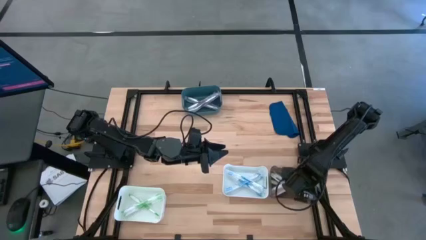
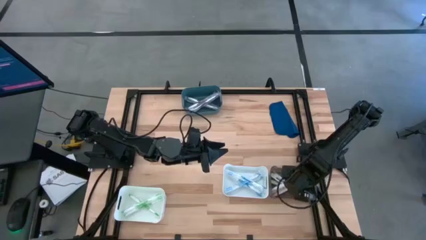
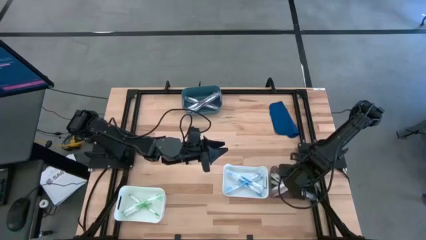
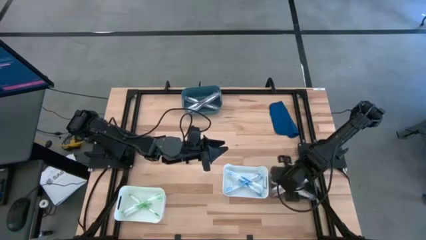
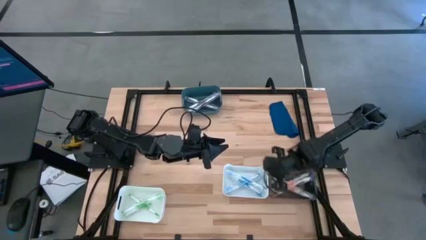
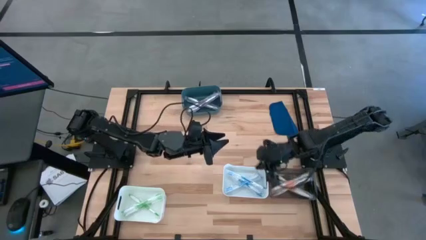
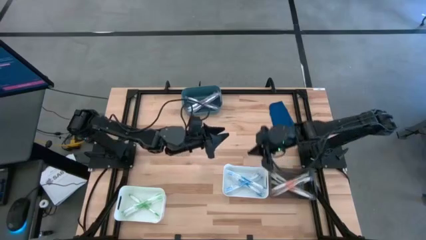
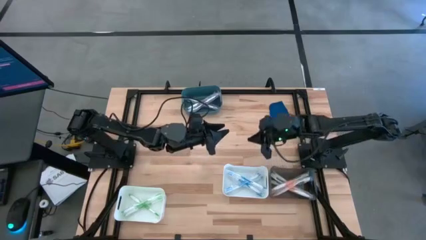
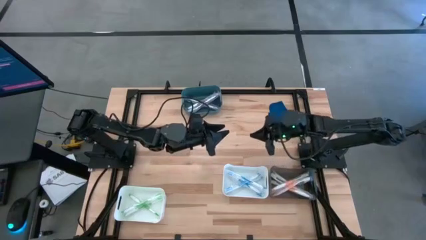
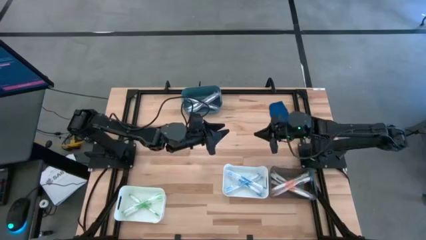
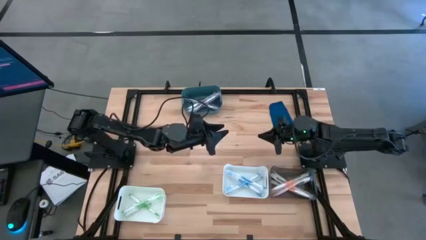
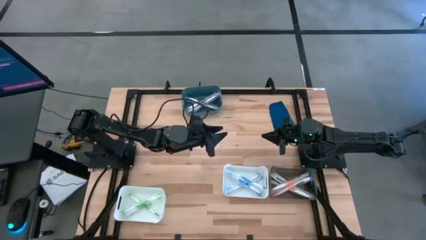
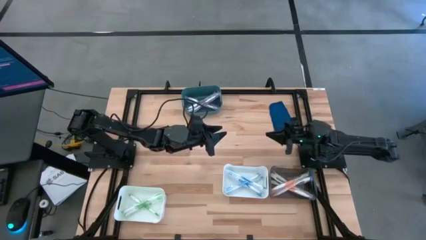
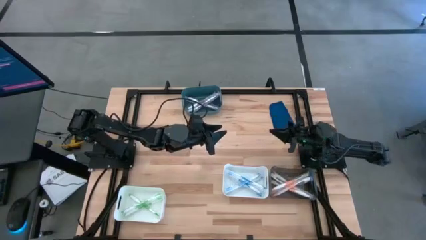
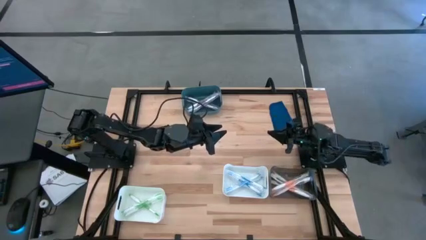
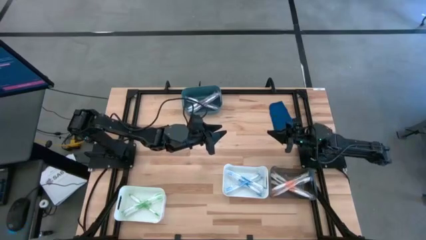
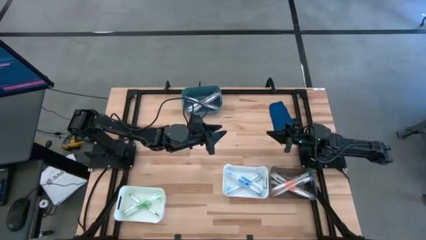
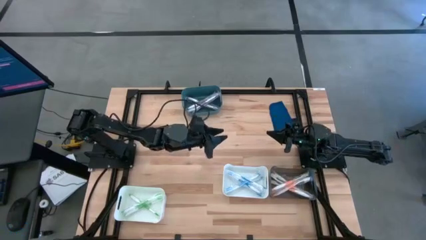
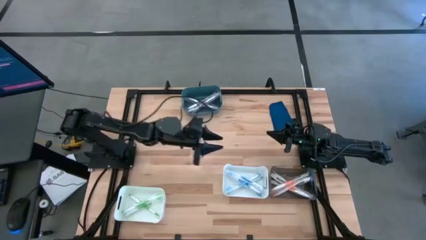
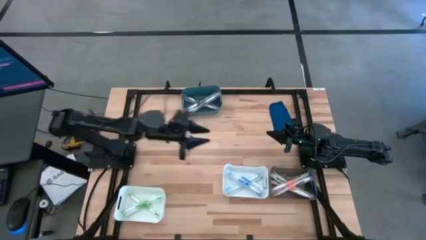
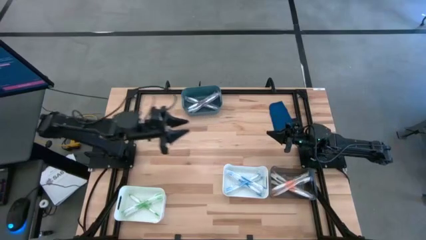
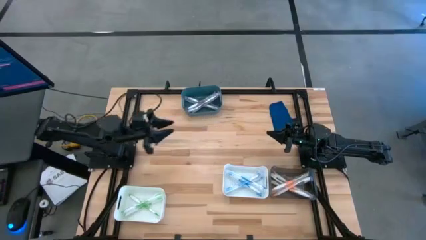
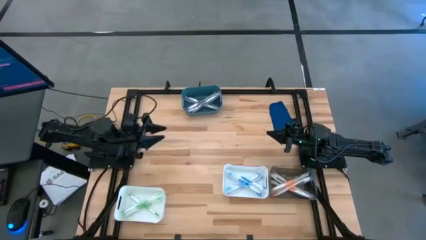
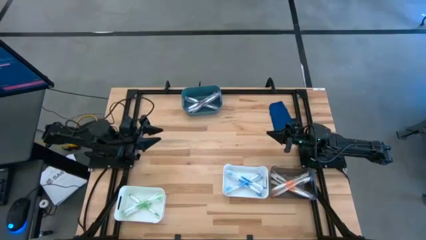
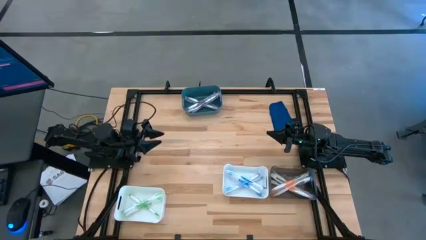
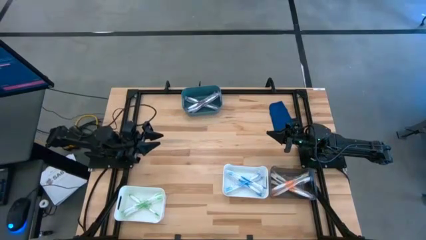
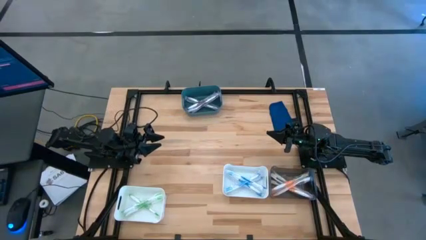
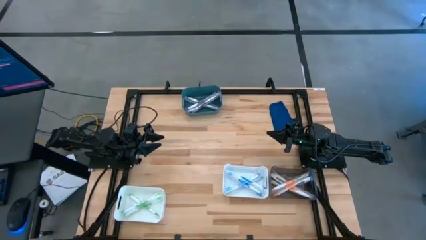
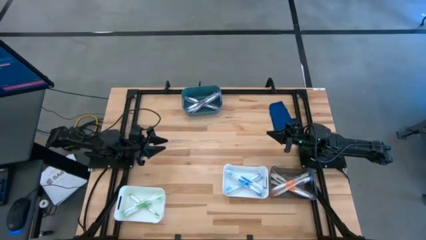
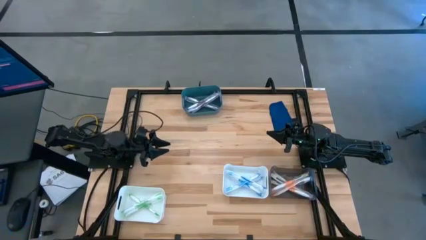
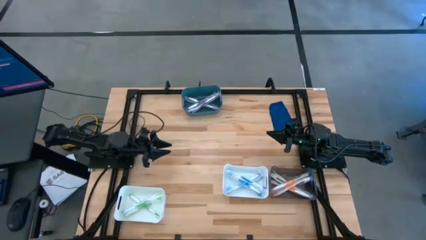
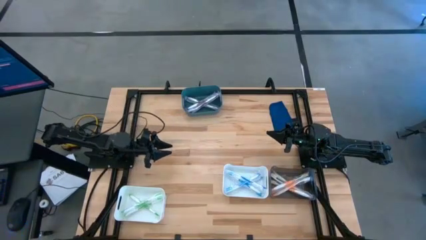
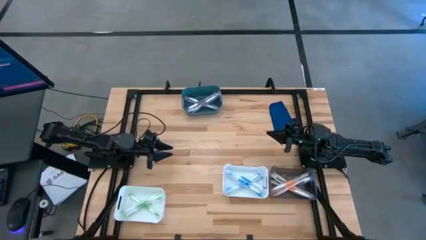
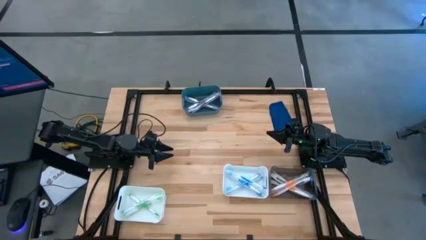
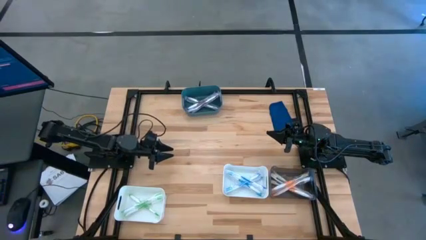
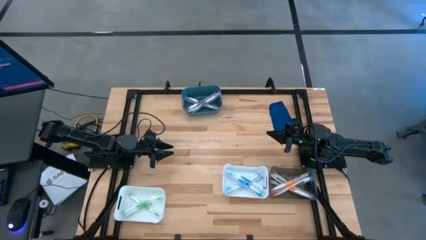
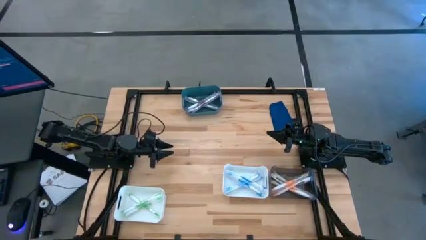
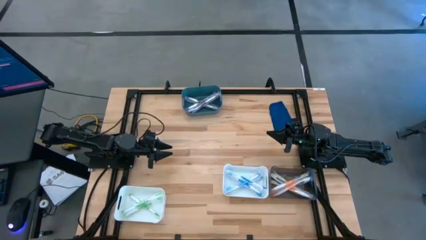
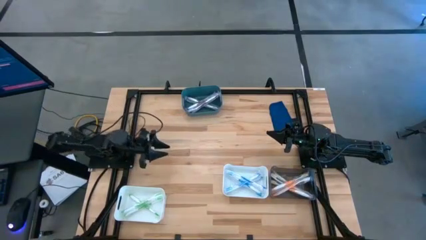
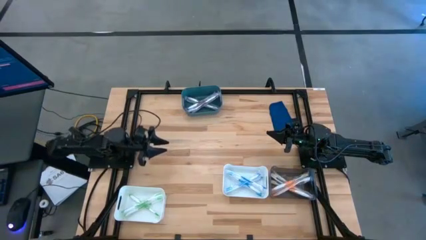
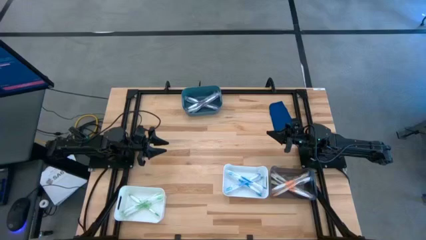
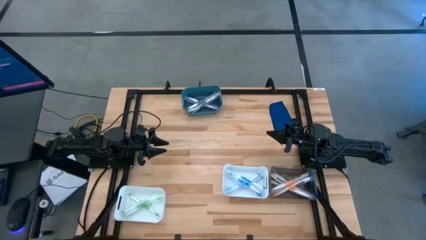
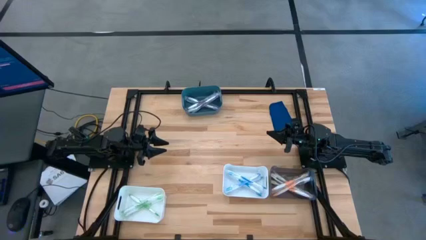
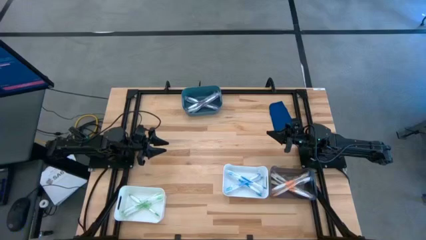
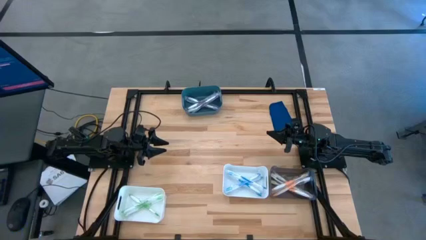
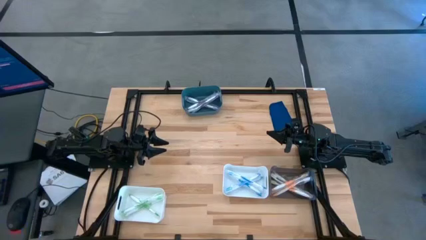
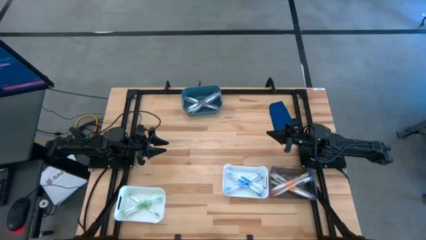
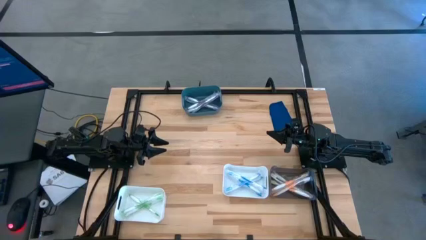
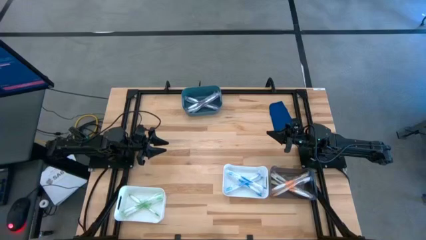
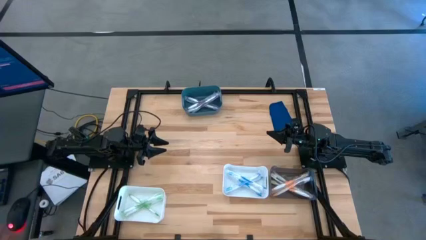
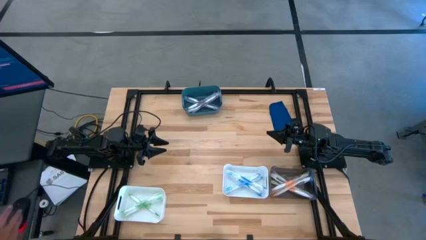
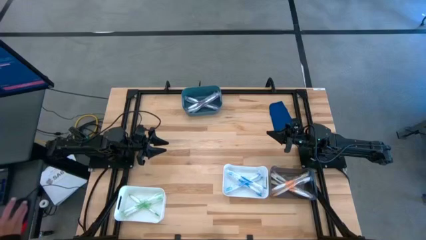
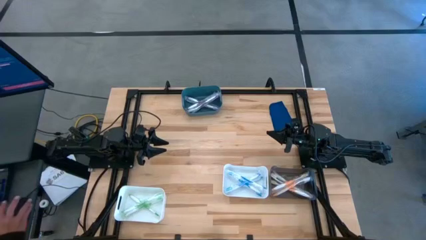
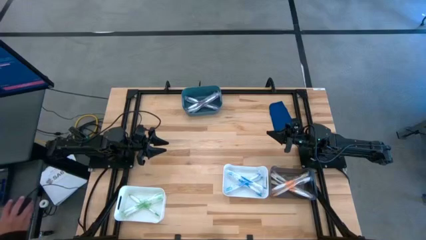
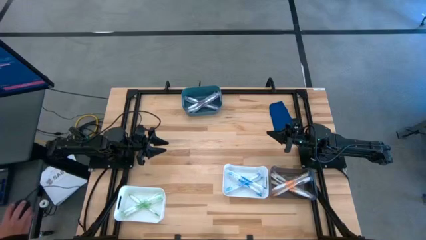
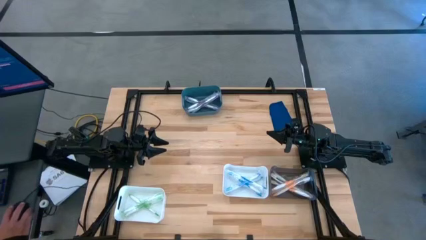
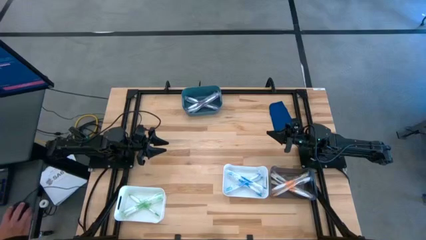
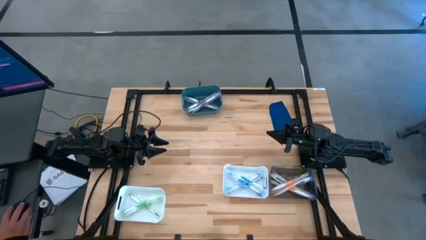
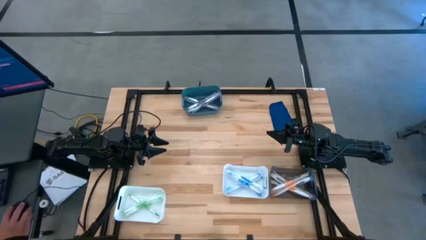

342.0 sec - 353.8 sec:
Task: Pick & Place Toothbrushes
Return to Home Position

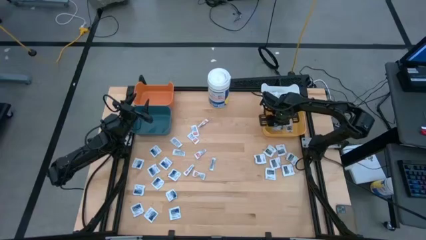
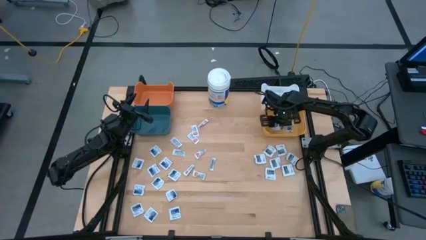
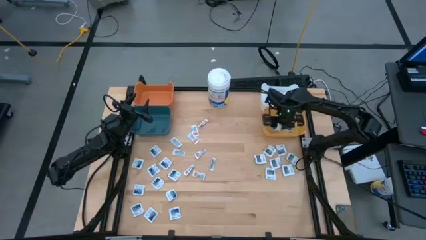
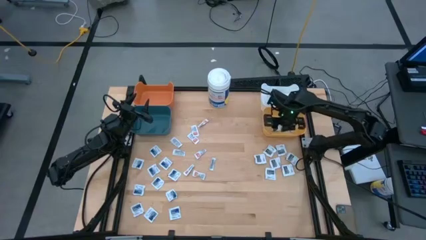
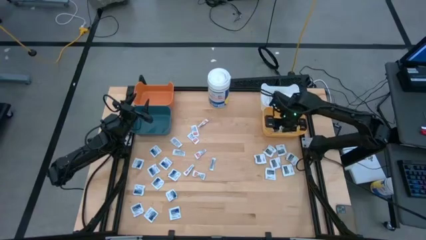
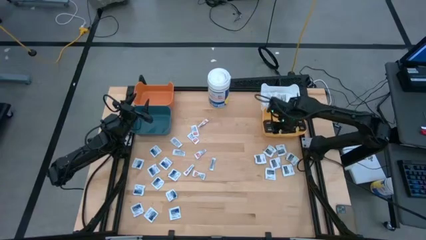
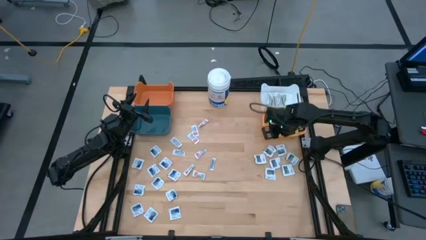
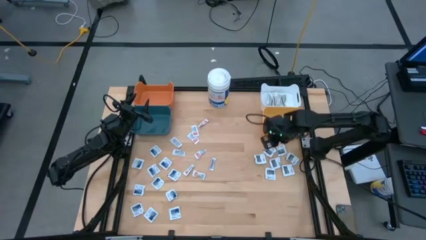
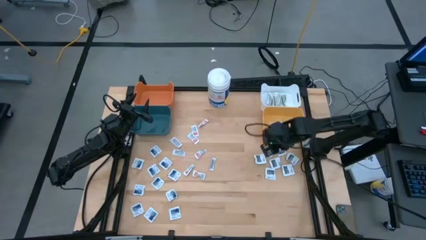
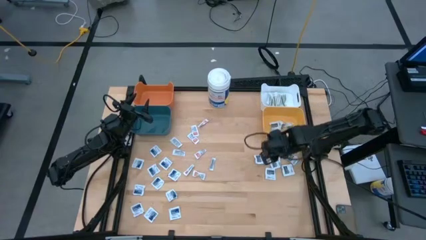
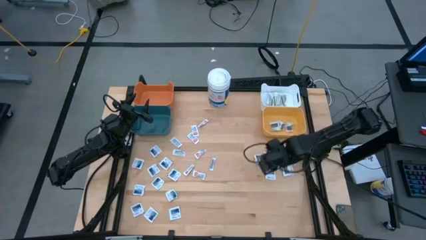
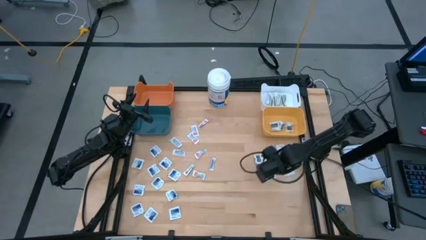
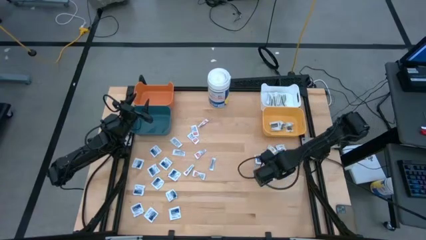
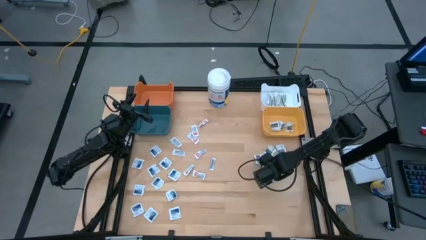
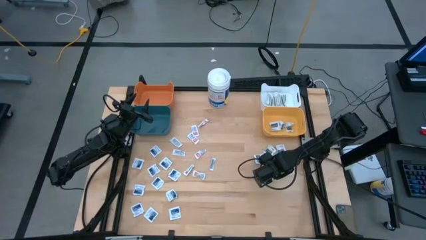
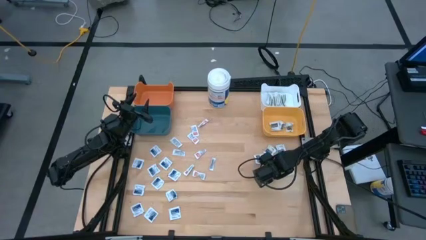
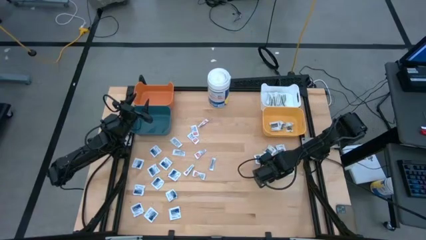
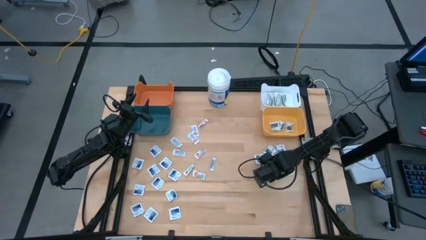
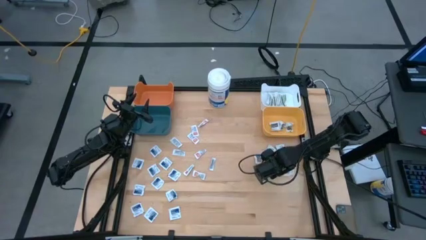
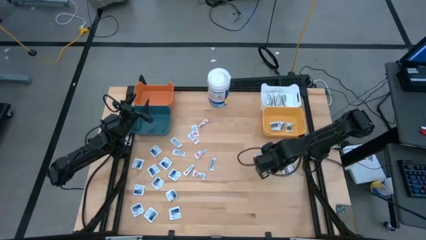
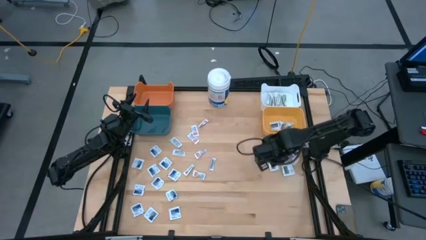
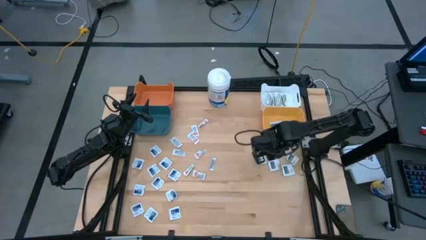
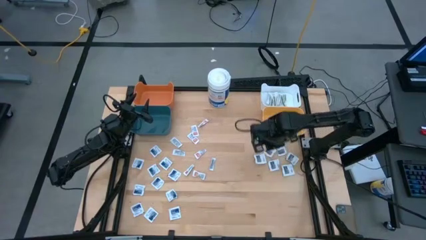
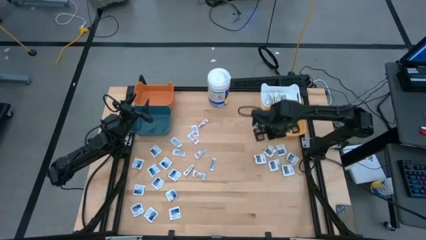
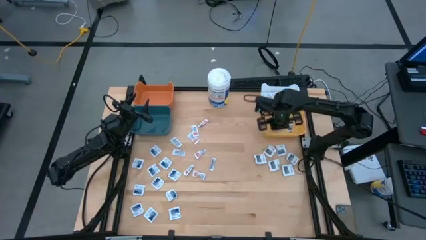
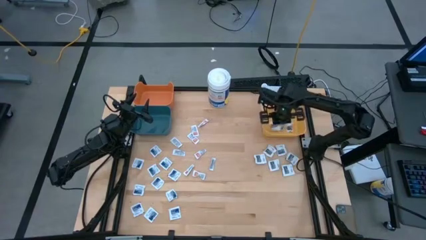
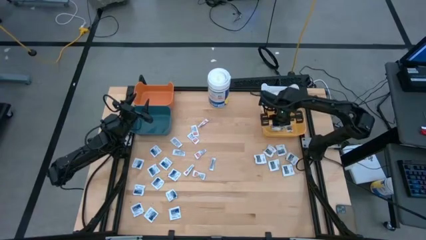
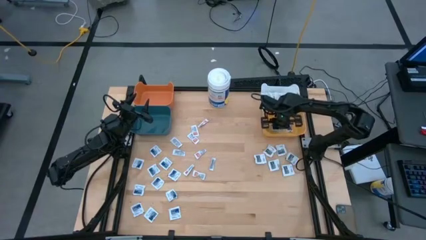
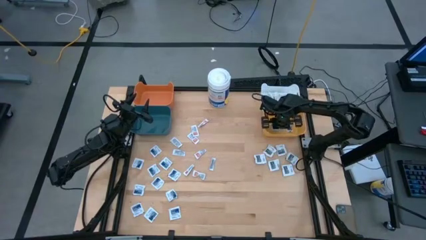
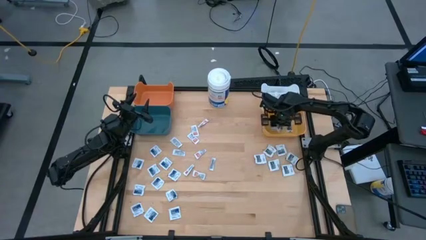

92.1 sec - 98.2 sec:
Task: Pick & Place First Aid Supplies
Put the black pad into the yellow bin
